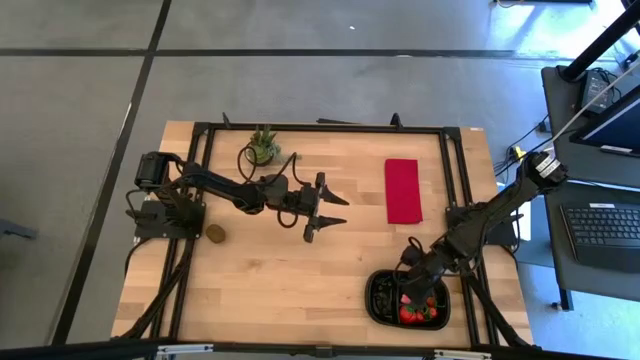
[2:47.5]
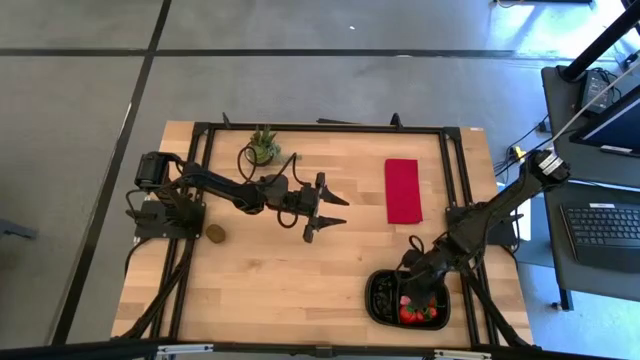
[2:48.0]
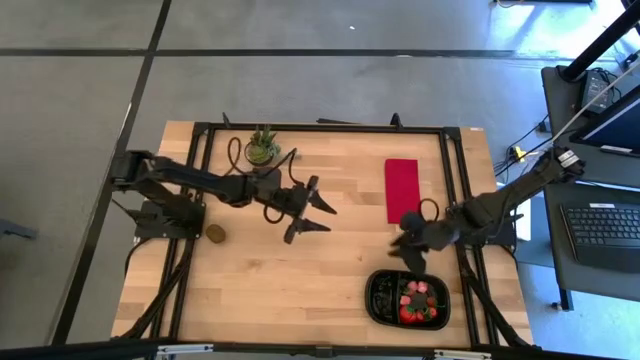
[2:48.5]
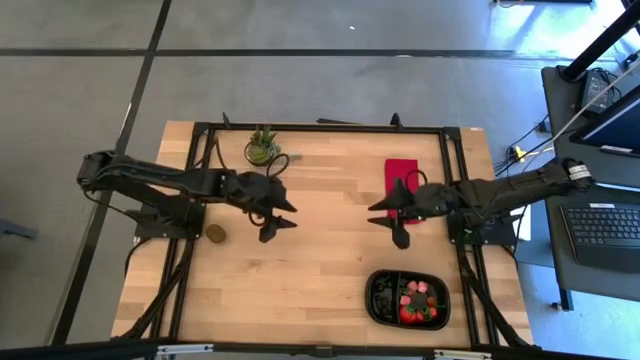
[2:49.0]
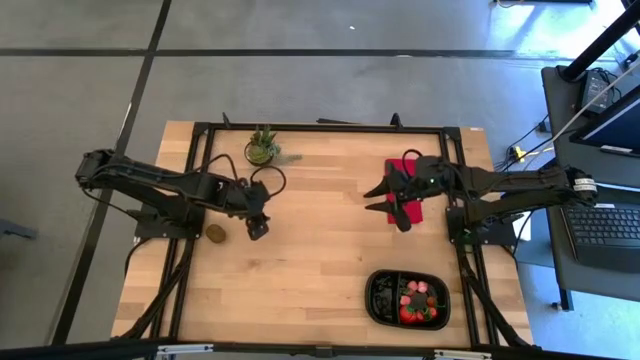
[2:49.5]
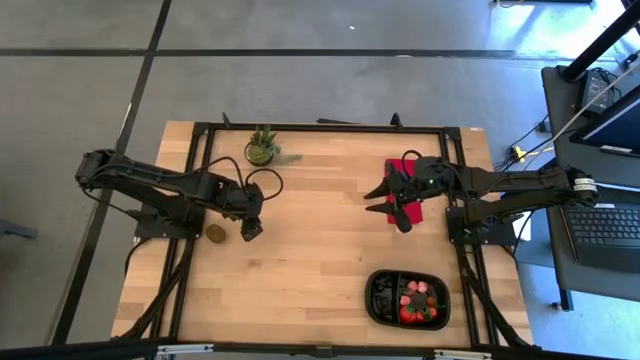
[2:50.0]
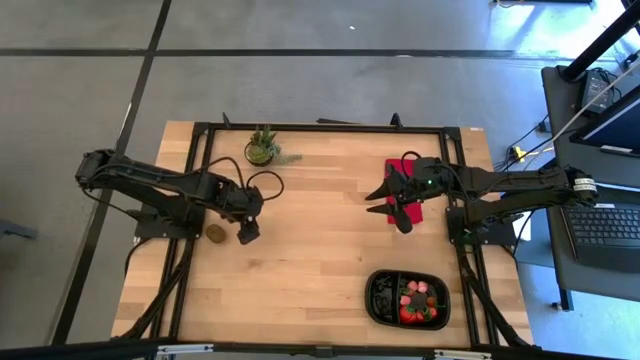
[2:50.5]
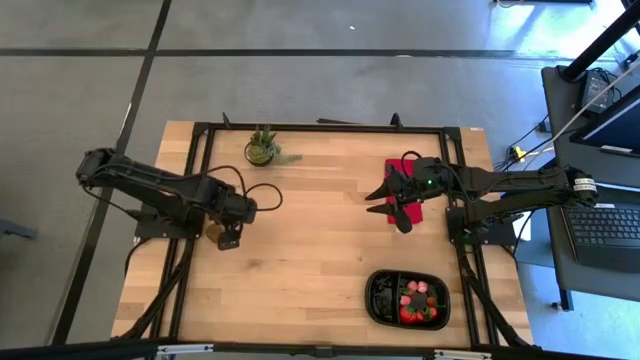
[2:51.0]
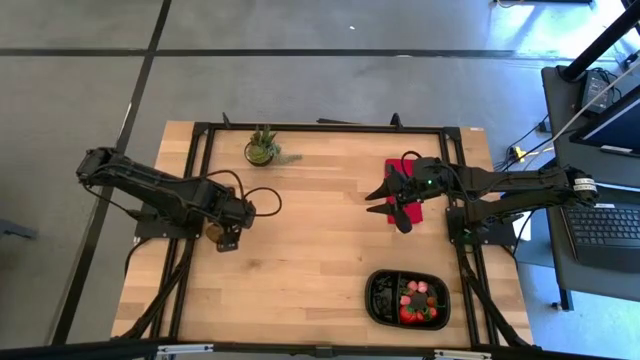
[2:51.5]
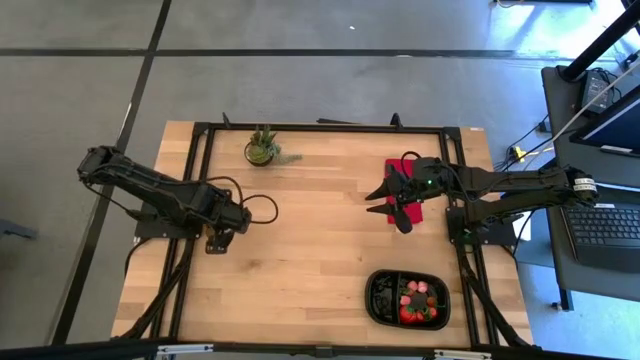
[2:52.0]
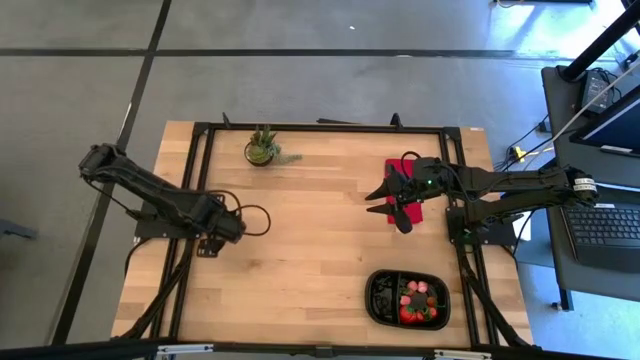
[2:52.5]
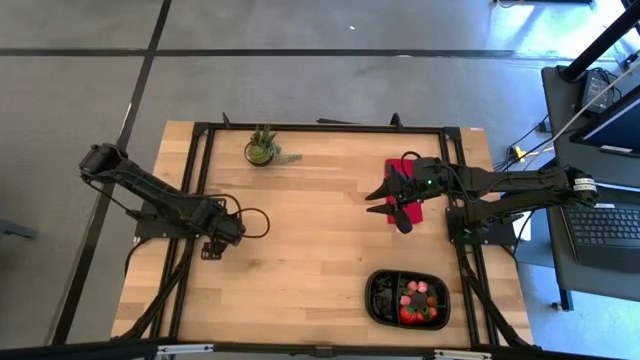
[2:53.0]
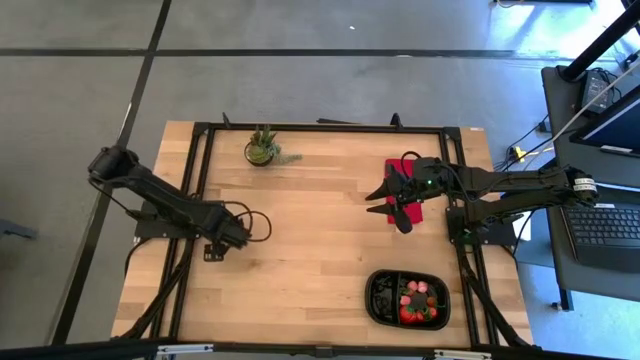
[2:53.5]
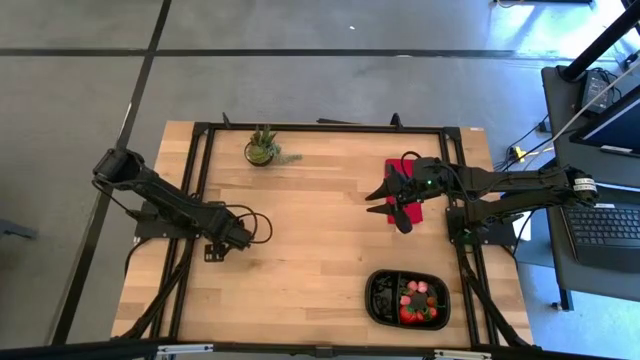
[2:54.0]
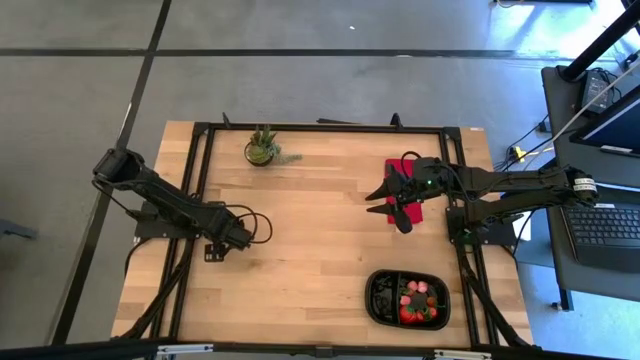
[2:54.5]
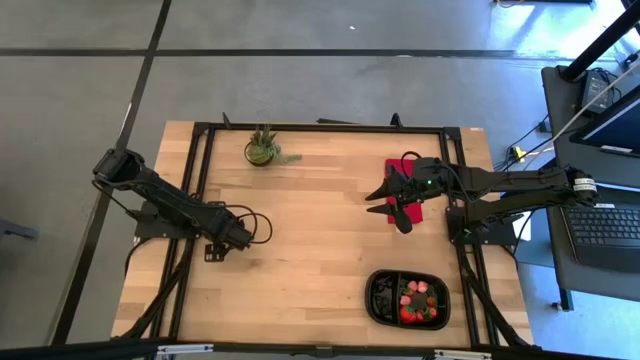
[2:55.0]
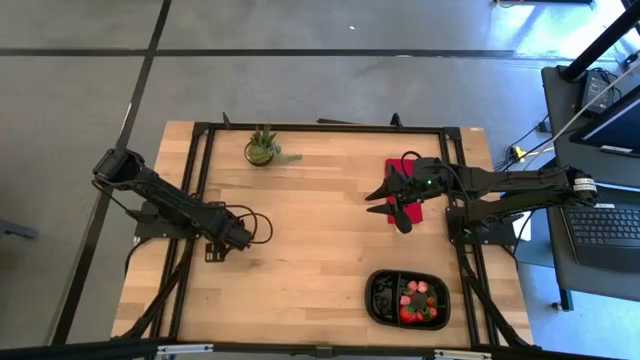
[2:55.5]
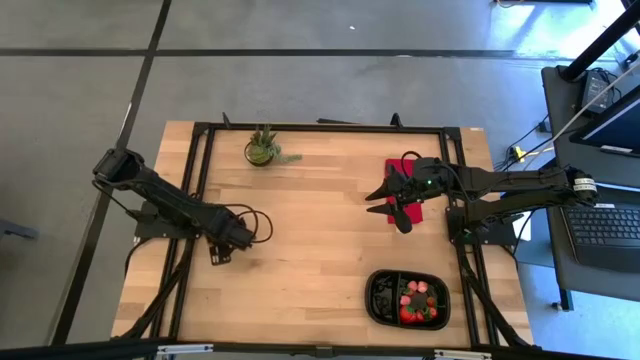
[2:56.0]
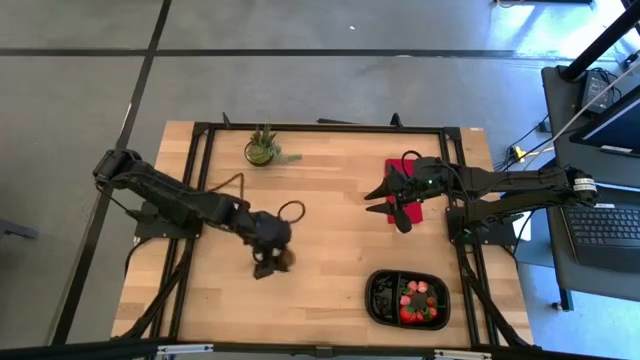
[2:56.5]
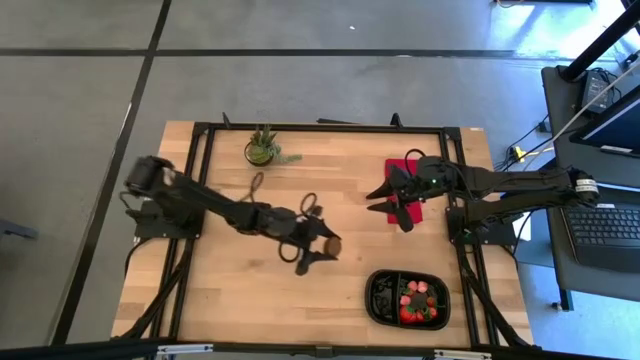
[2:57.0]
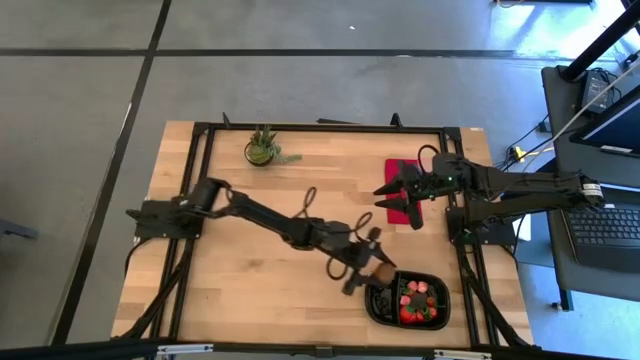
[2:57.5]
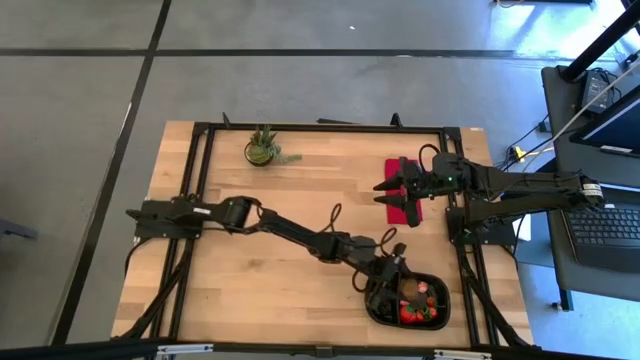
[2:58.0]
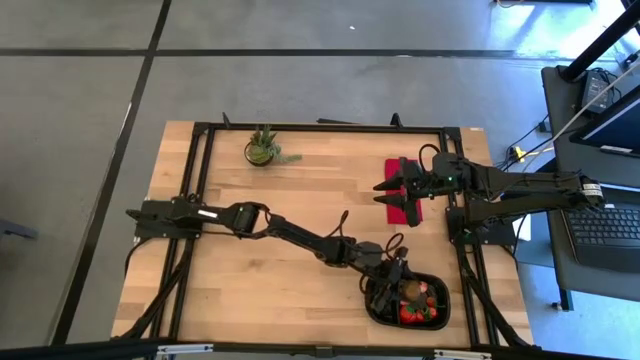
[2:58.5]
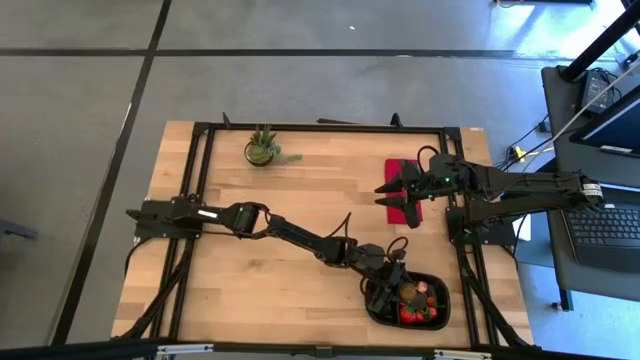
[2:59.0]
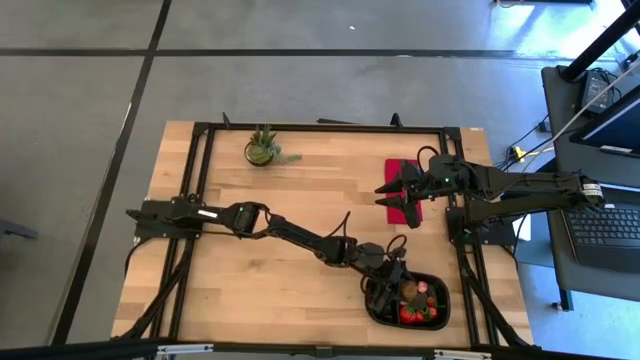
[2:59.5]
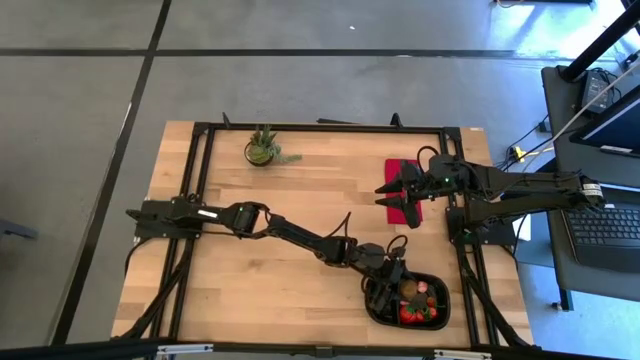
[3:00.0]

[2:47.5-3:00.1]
Task: Pick and placing Produce into tupperware
Put the kiwi into the right of the black bin

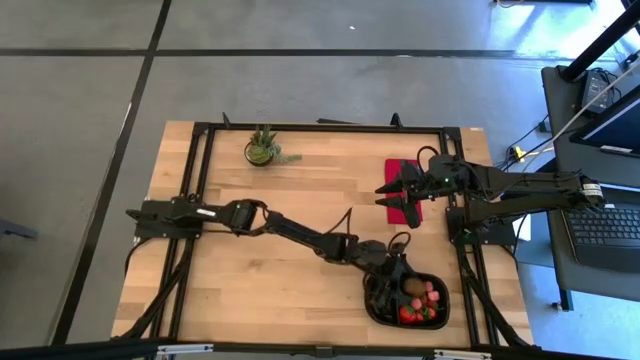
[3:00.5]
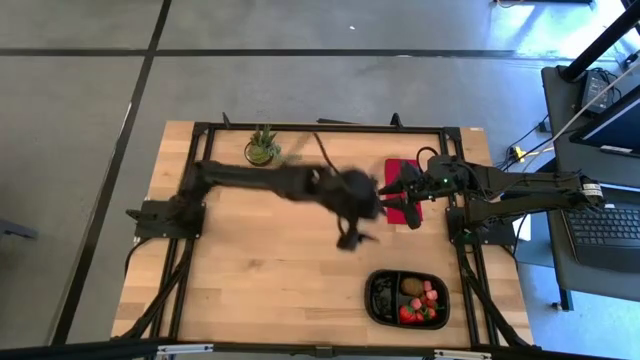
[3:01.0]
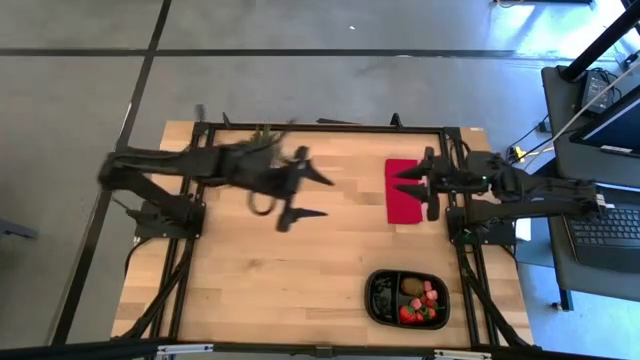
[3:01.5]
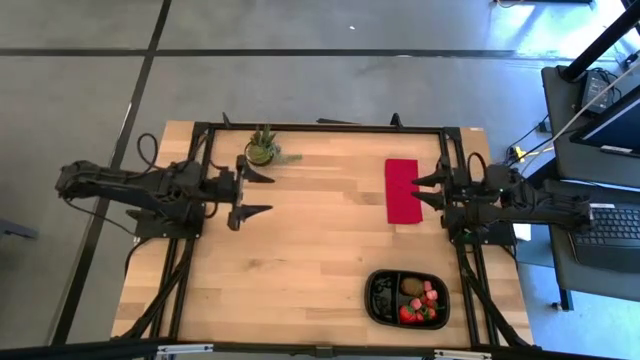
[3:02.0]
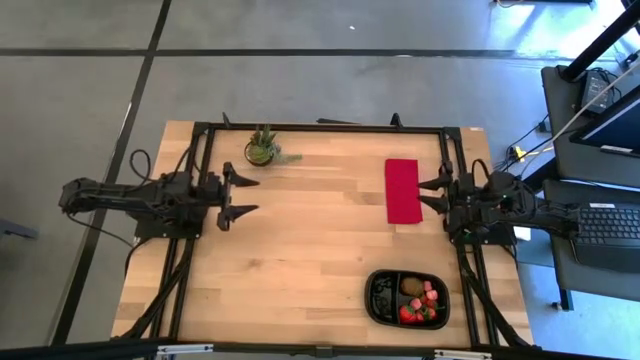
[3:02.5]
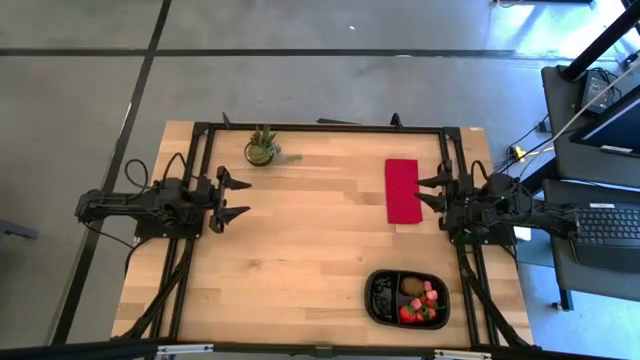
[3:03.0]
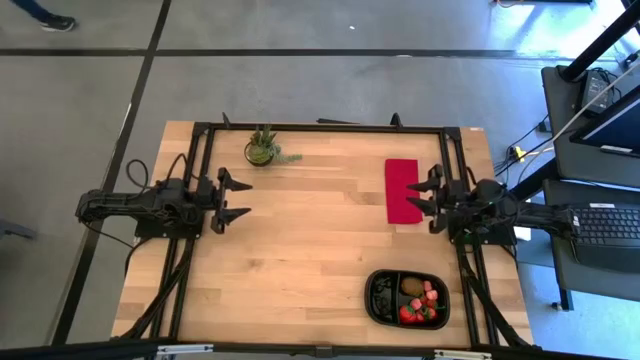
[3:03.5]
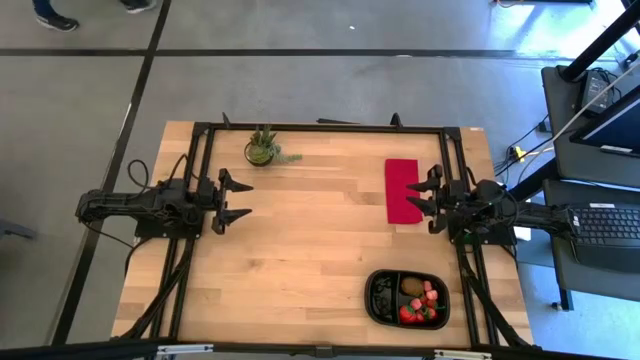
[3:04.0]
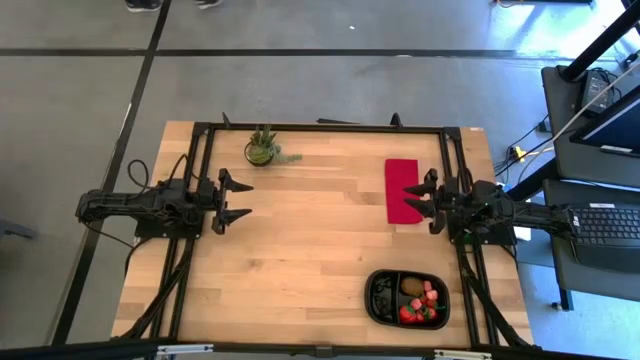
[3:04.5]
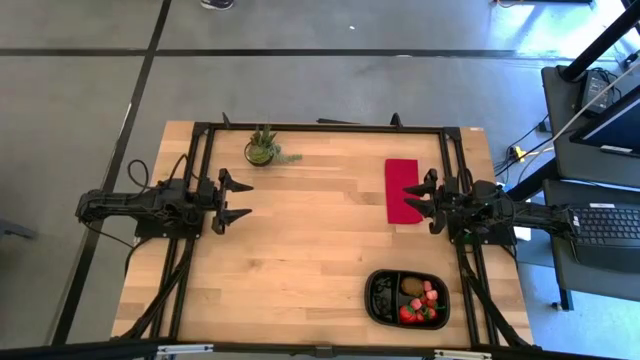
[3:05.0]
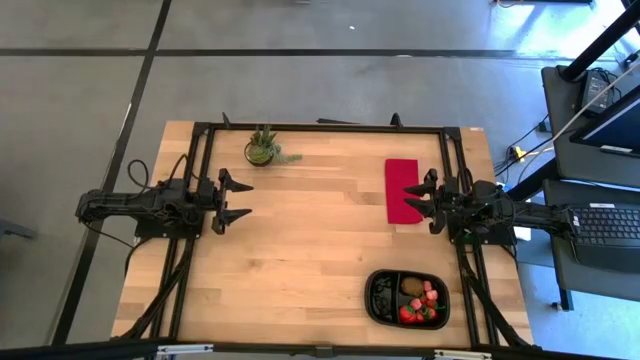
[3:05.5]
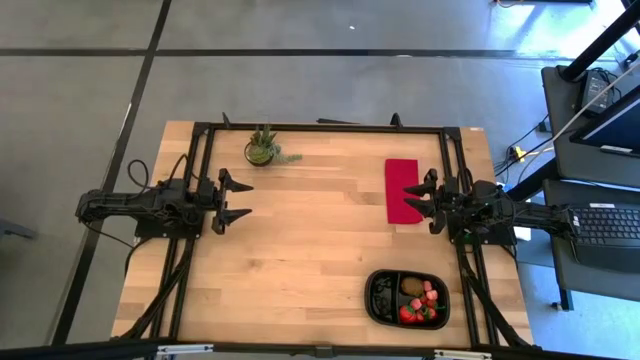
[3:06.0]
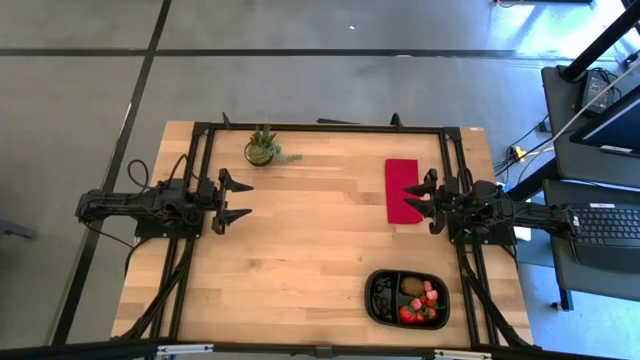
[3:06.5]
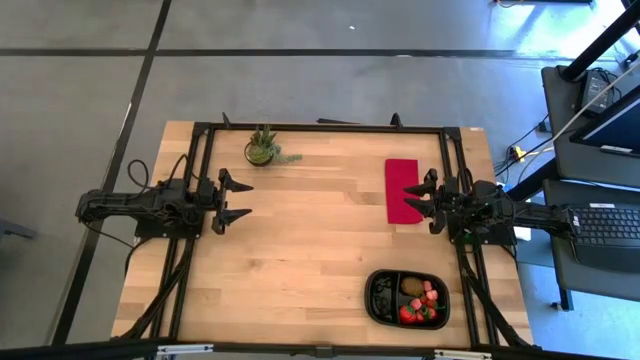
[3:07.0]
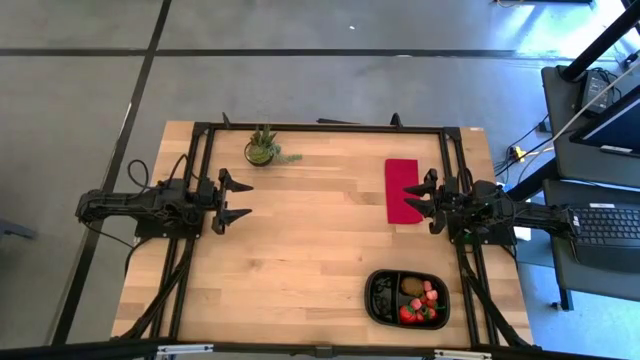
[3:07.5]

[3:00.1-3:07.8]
Return to Home Position
